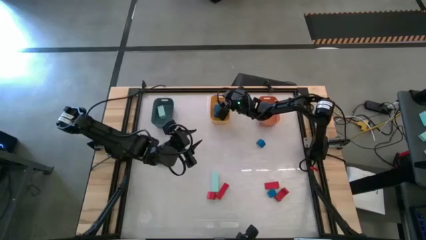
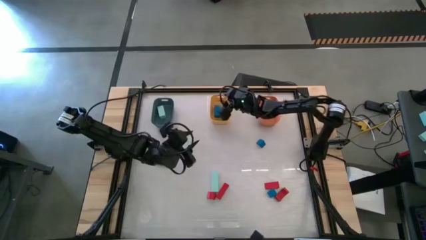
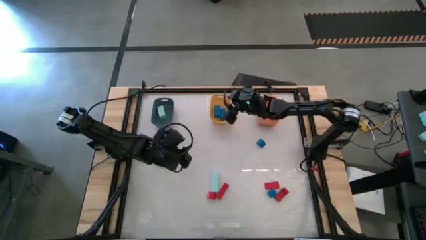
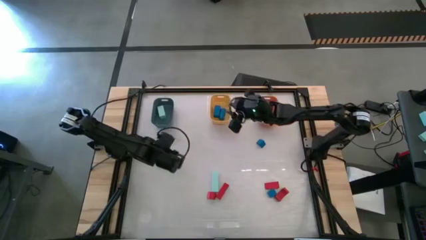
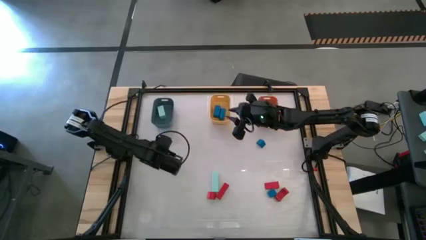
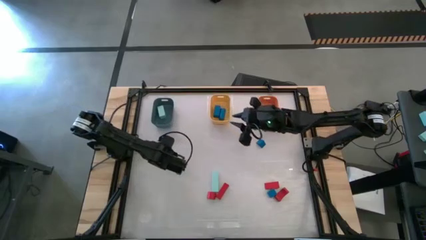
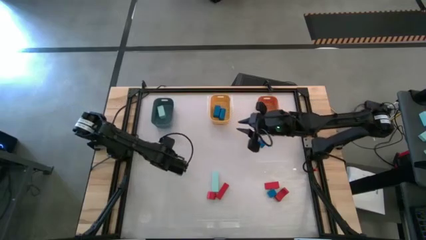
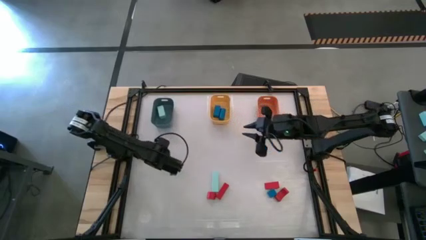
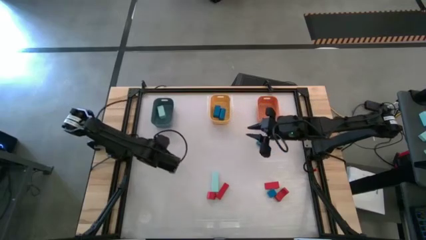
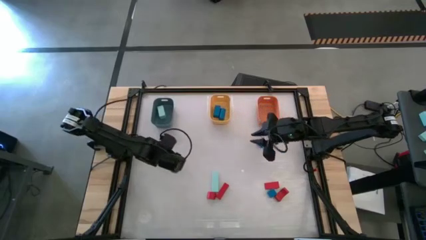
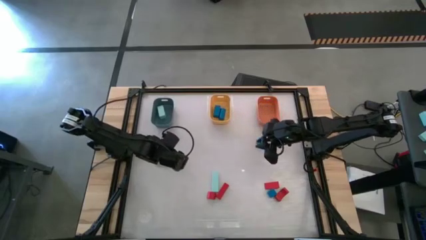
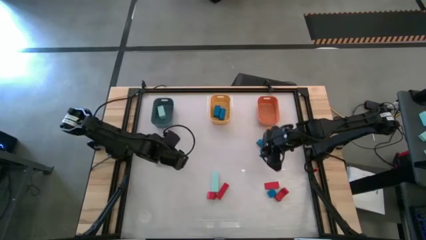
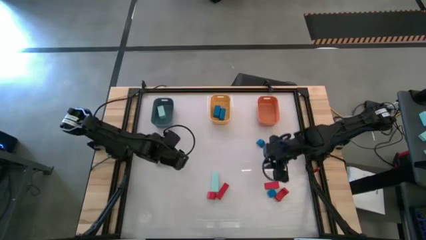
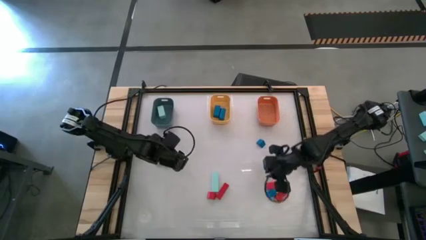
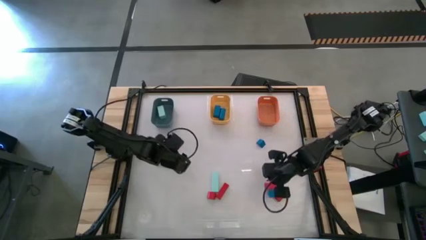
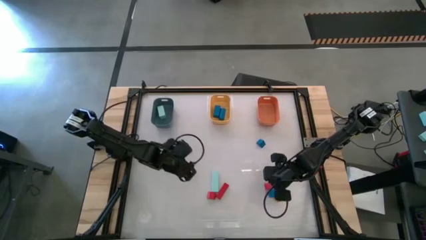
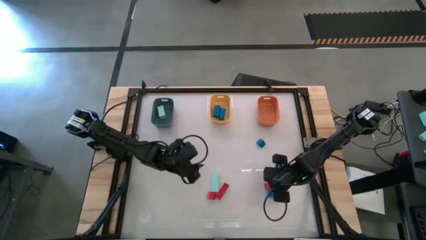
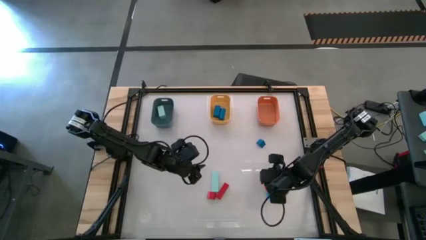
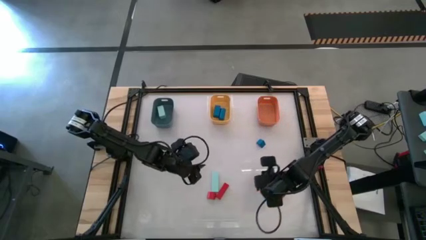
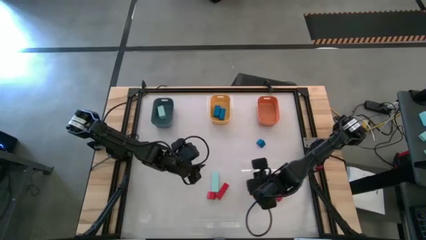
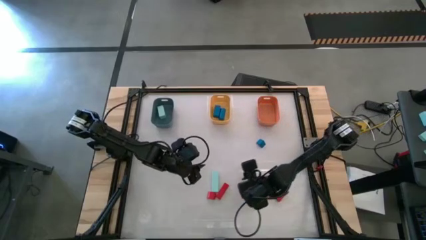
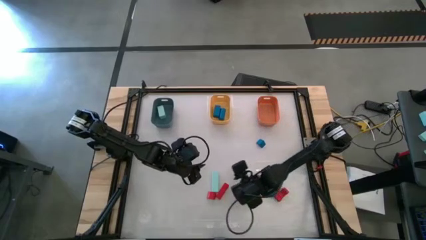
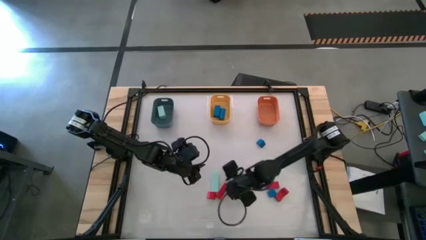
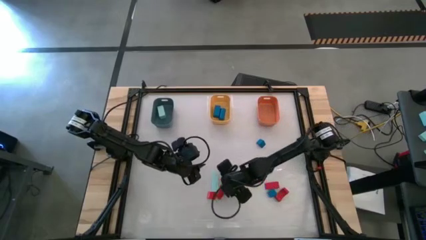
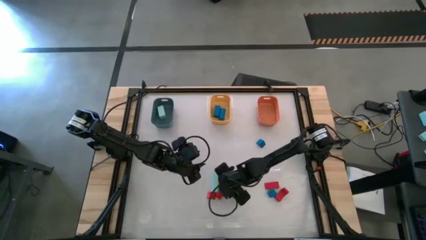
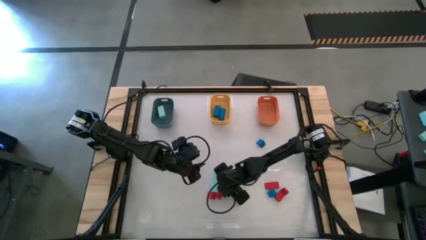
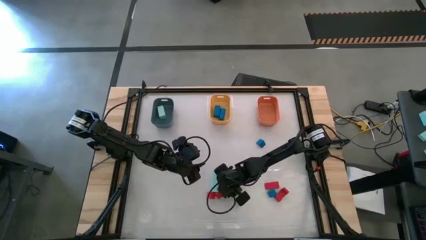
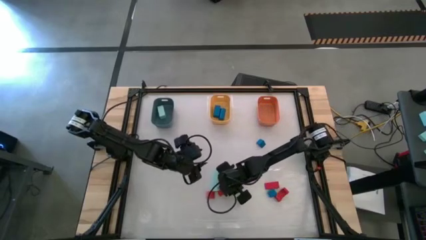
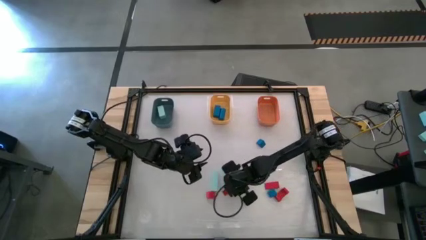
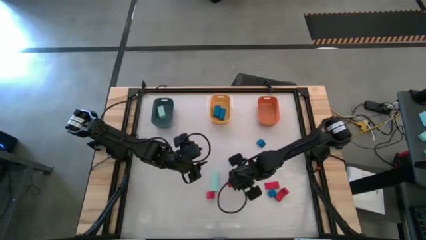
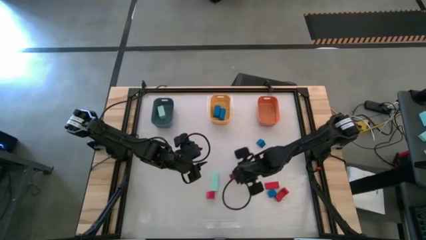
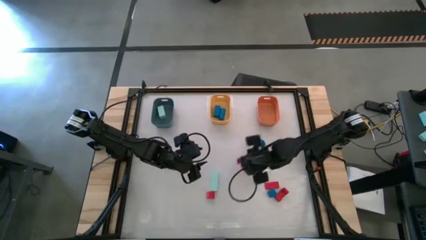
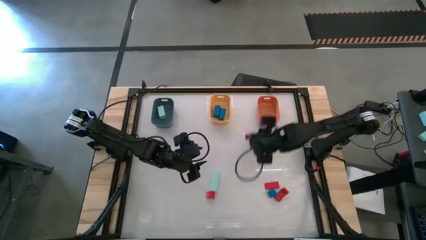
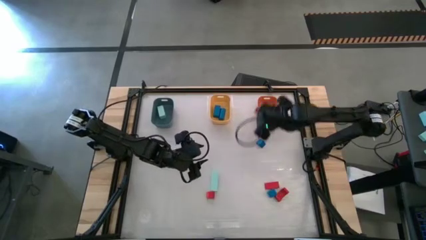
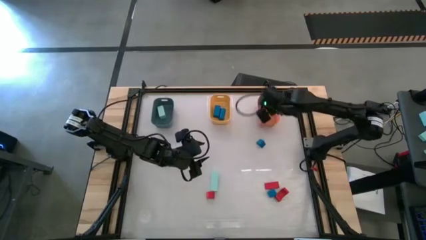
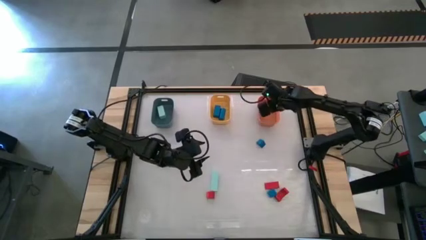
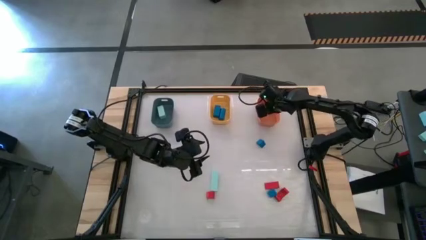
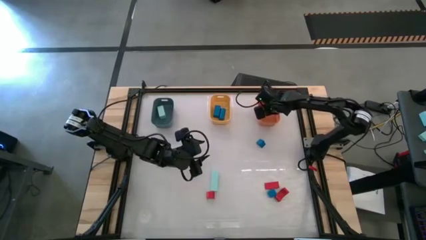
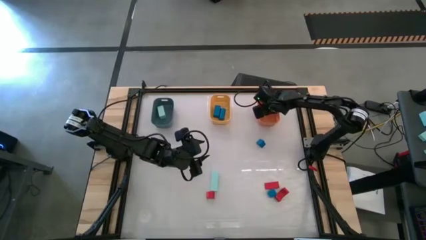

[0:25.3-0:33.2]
Task: Sort & place blocks by color
Put the red block into the orange bin

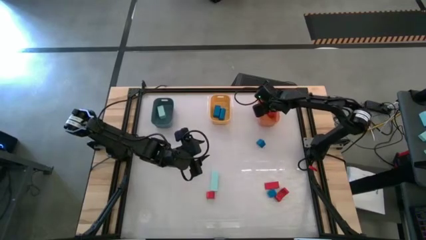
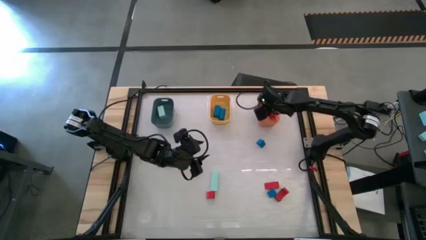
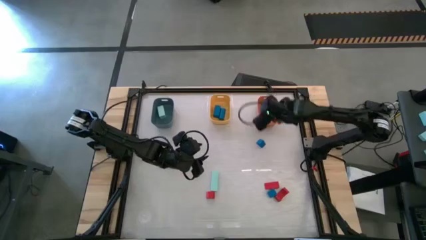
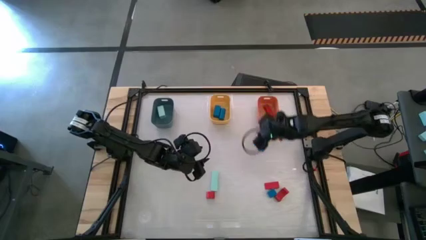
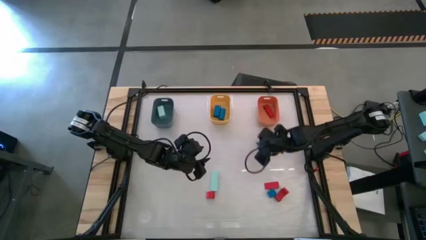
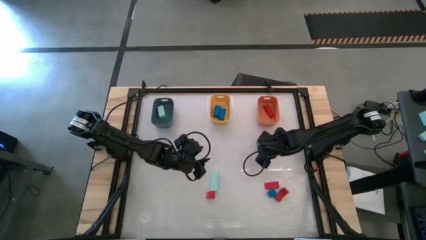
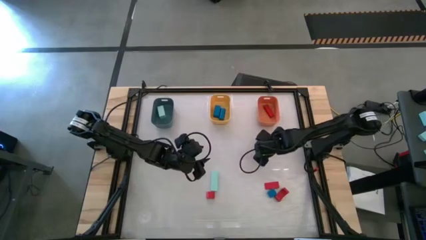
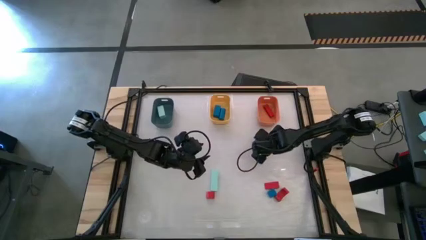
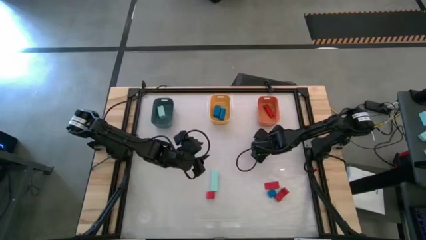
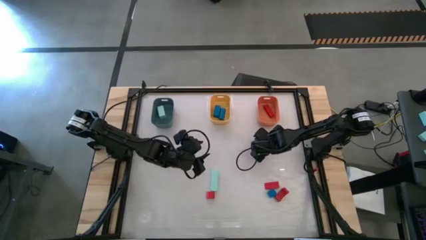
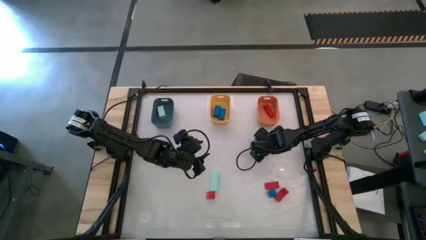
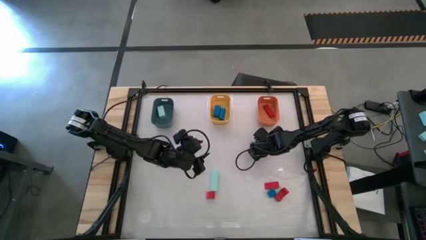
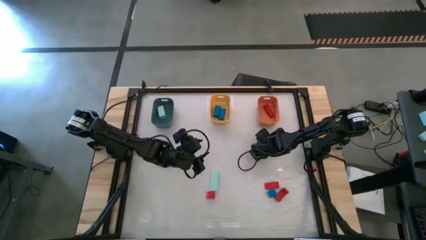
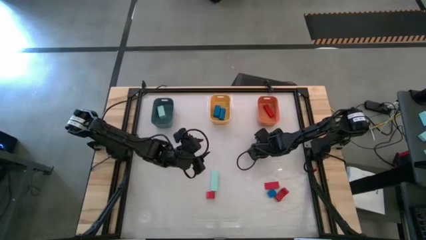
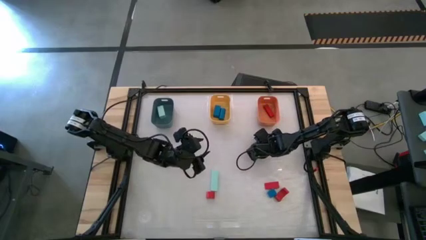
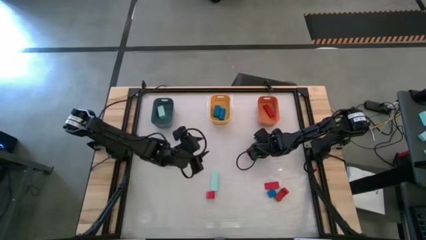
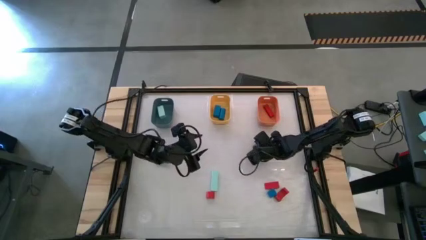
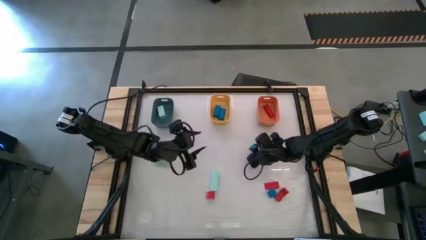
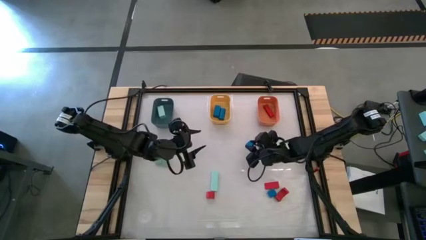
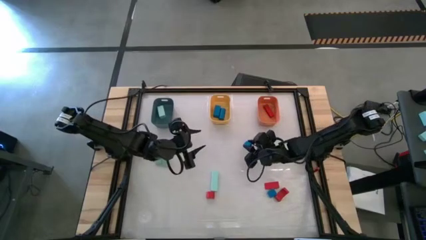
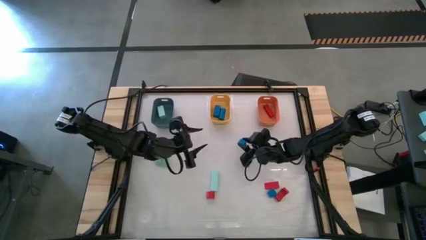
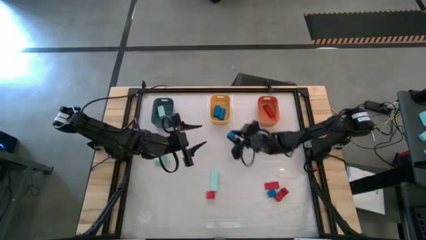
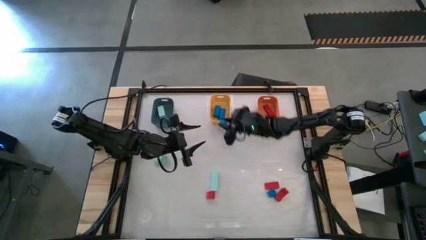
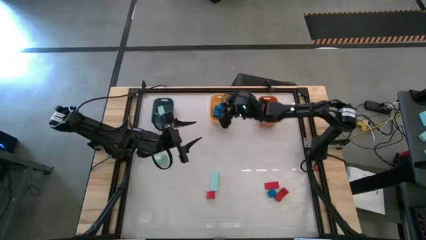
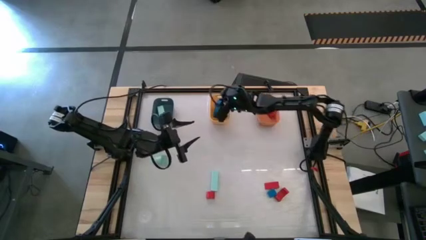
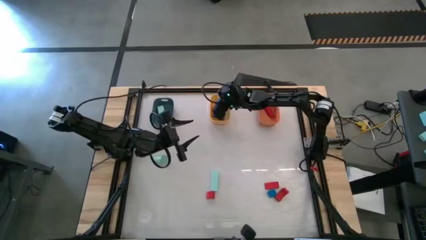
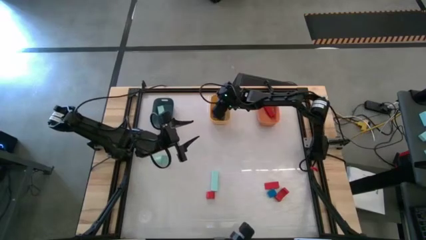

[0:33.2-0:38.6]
Put the blue block into the yellow bin

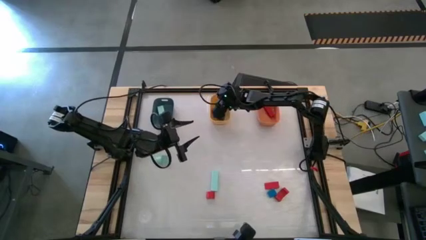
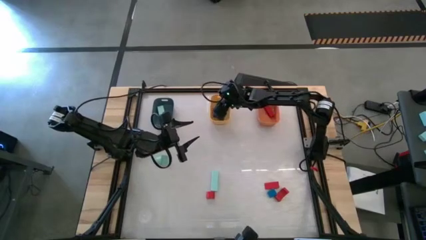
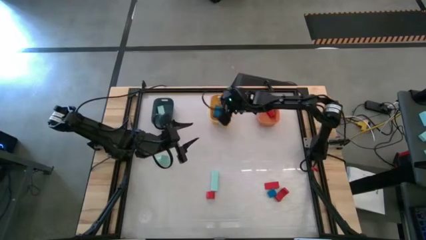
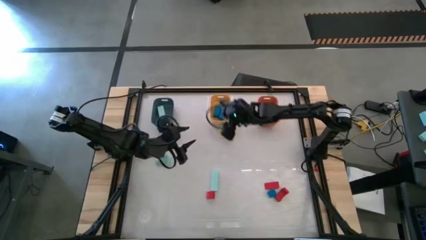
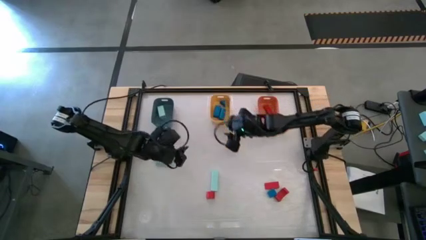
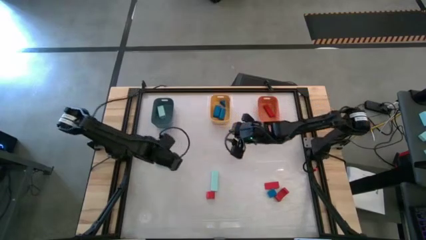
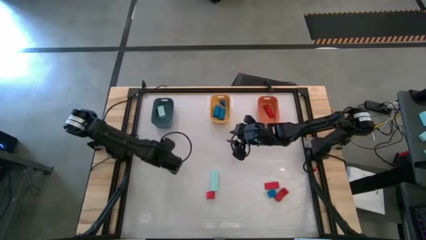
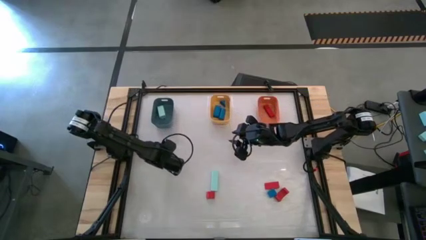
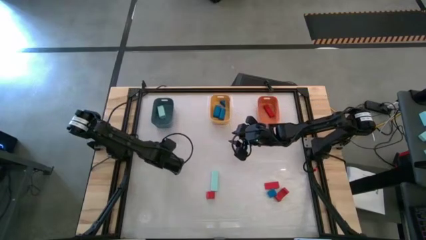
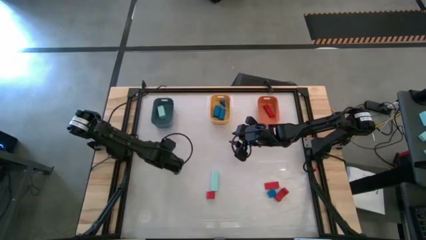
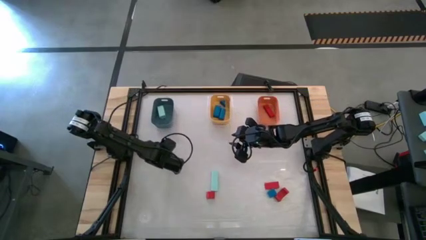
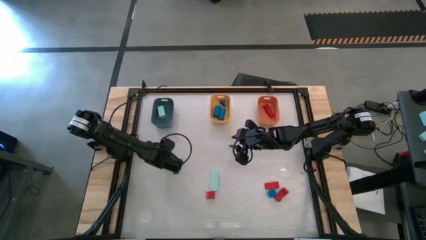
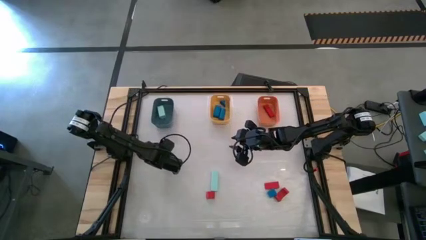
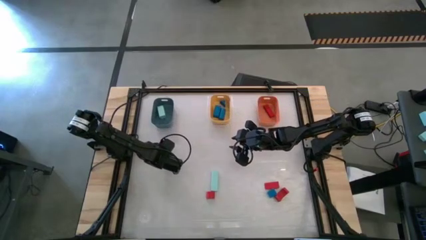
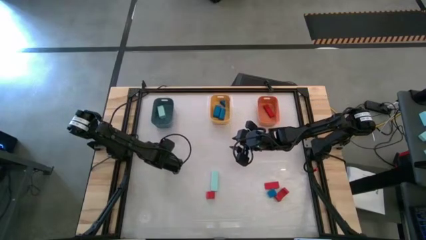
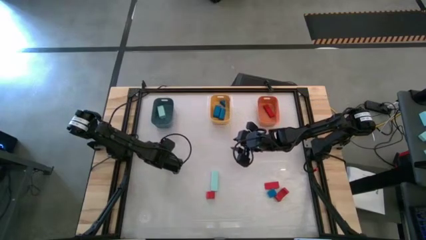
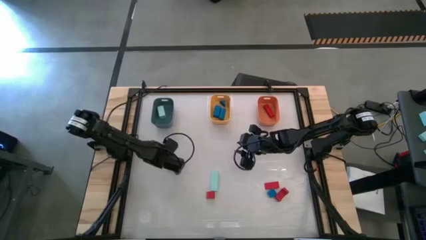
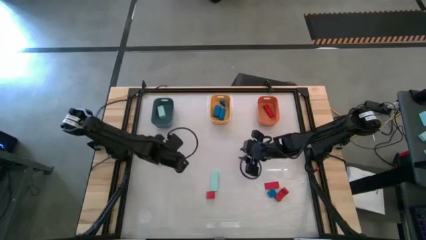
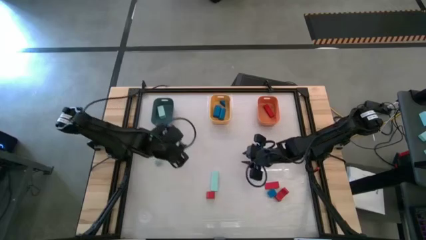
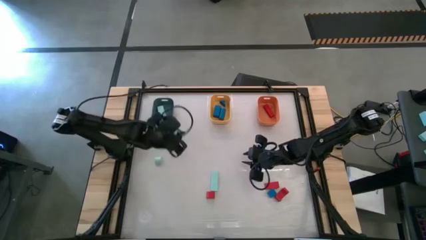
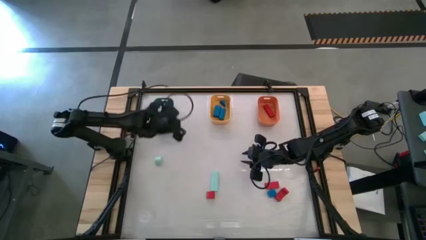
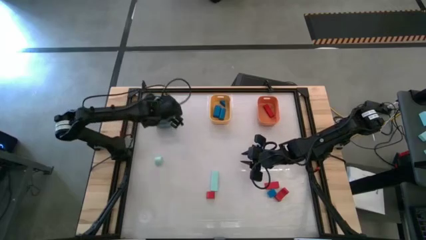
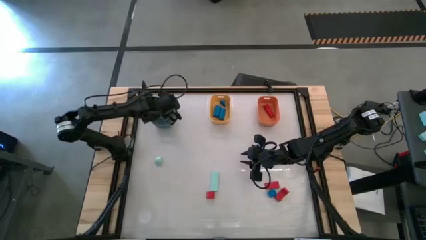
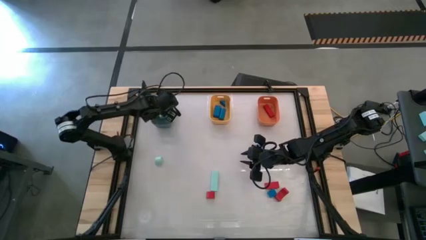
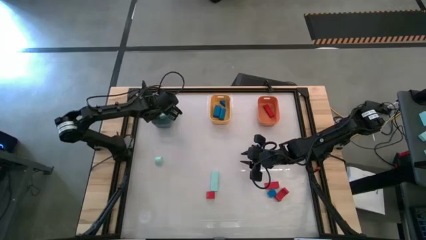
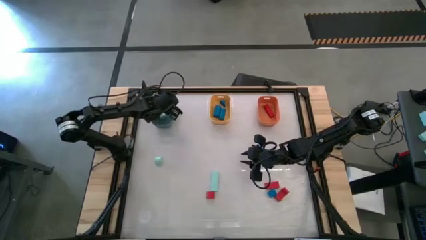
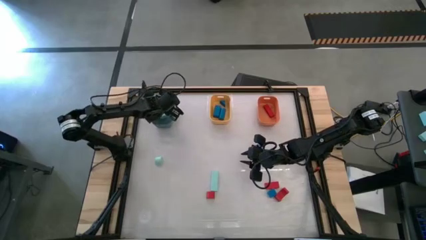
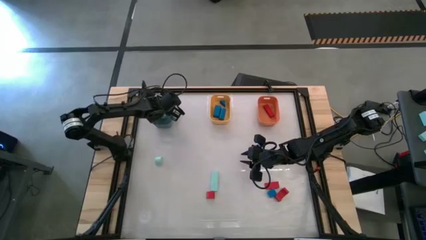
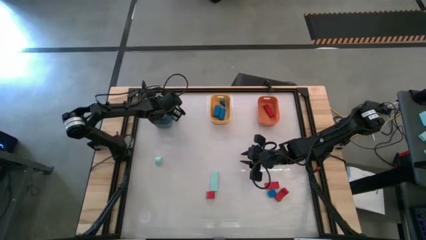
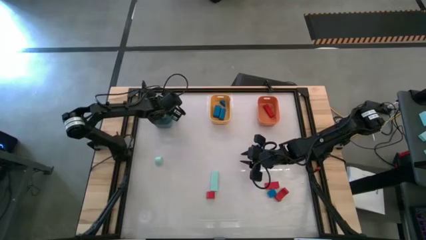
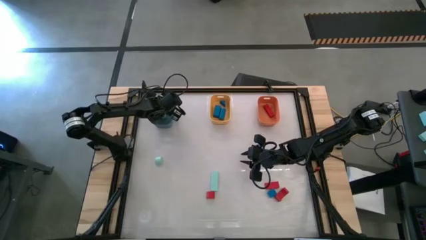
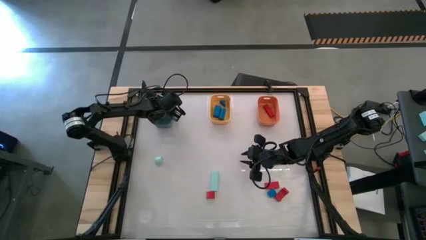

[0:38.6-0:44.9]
Put the light blue block into the green bin
